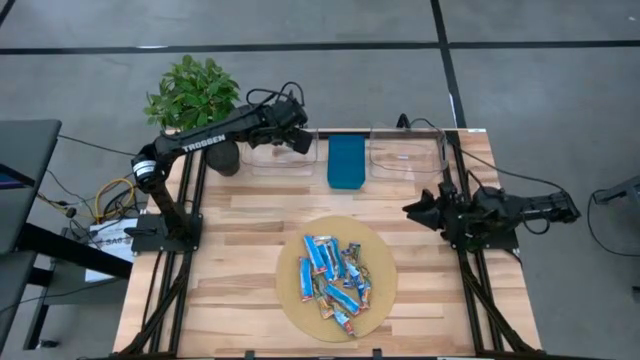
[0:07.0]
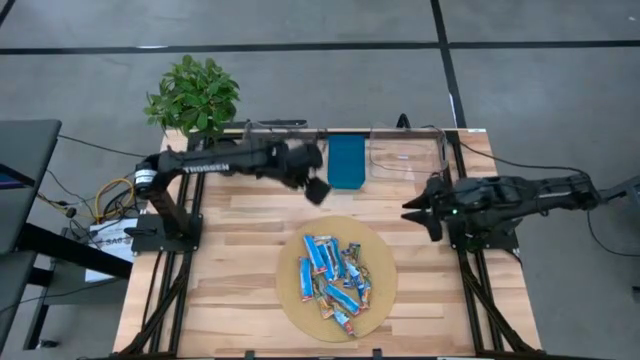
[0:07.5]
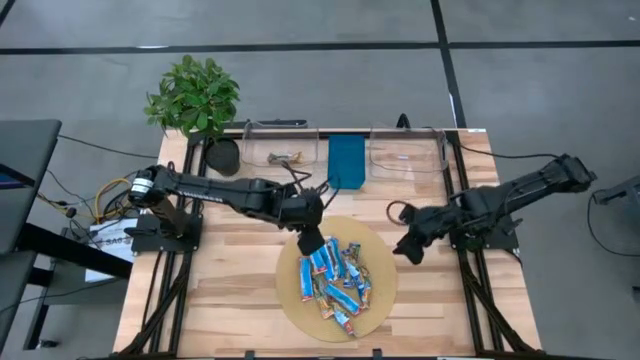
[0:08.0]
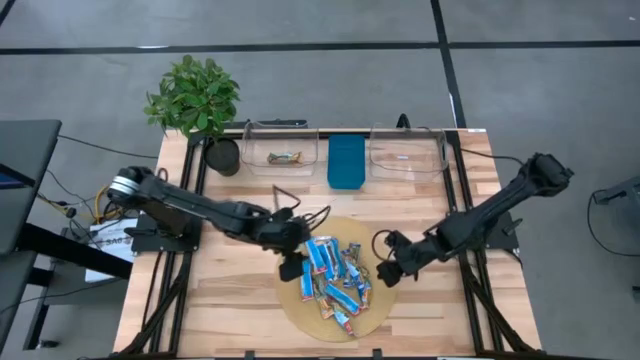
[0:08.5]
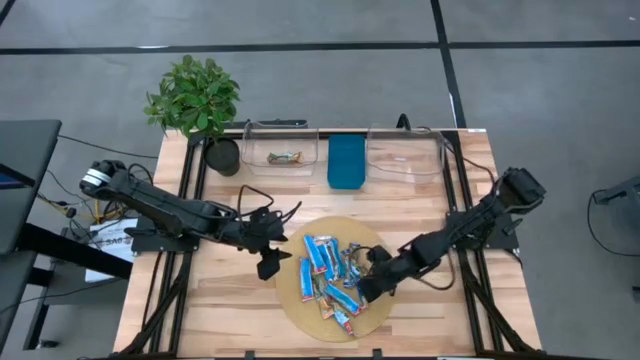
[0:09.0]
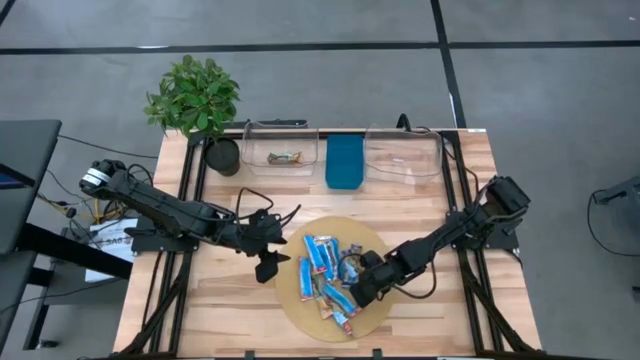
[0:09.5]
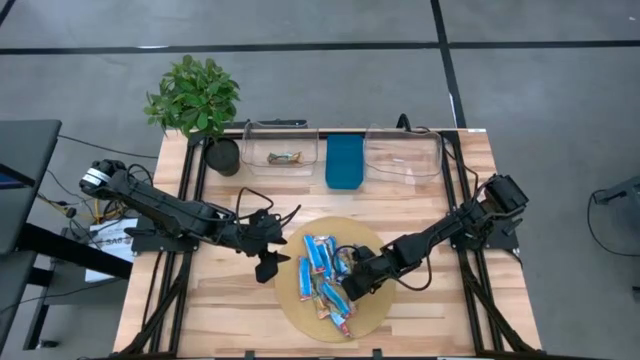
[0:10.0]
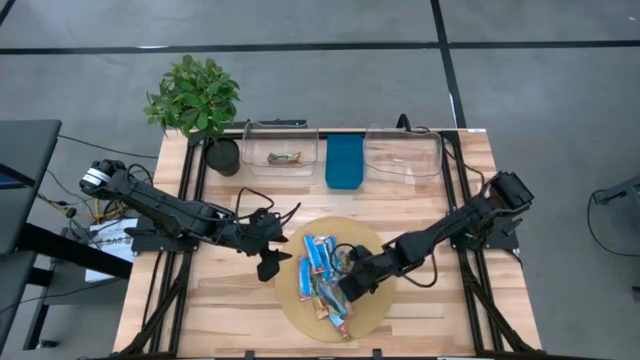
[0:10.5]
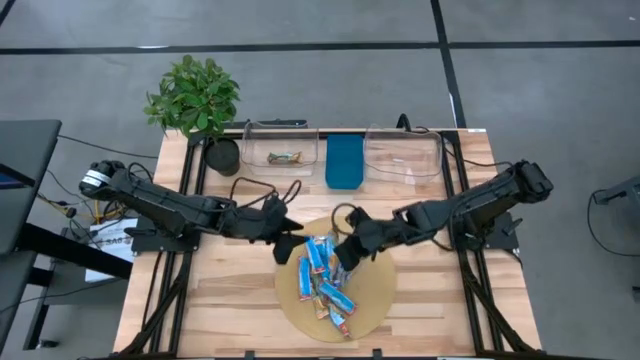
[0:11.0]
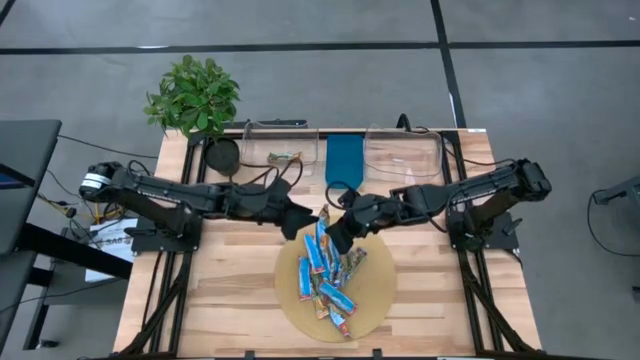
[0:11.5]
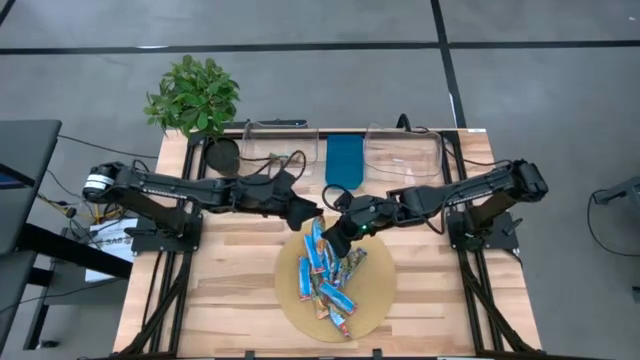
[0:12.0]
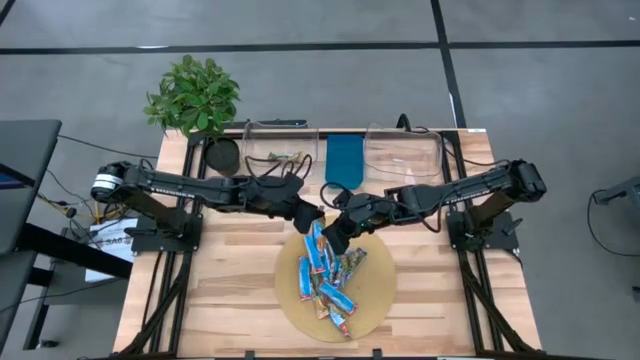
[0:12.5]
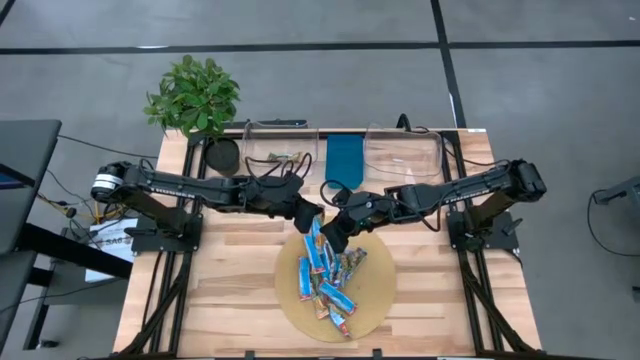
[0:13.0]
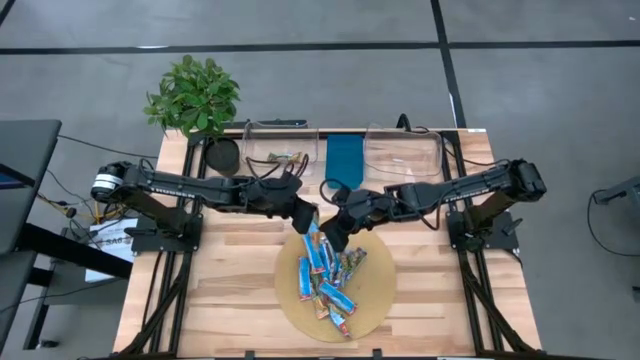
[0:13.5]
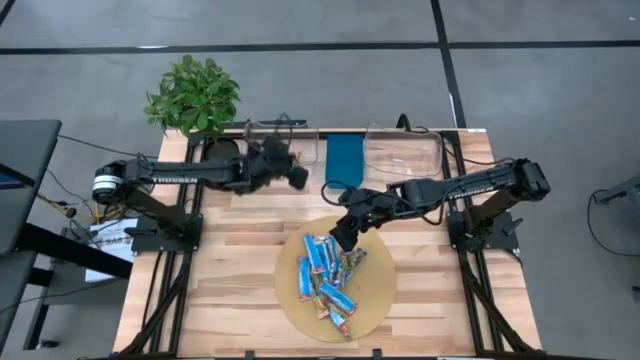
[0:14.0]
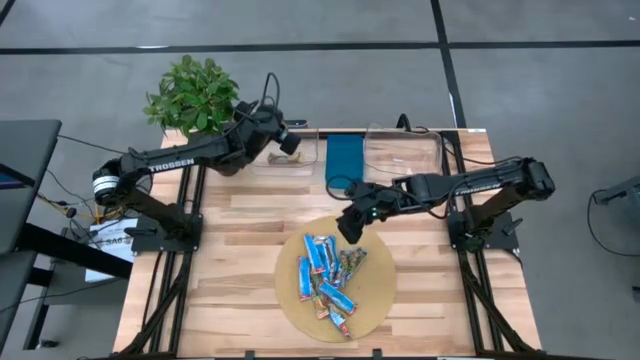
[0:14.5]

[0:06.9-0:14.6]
Task: Pick and place Granola Bars by type
Put the yellow granola bar into the left transparent bin

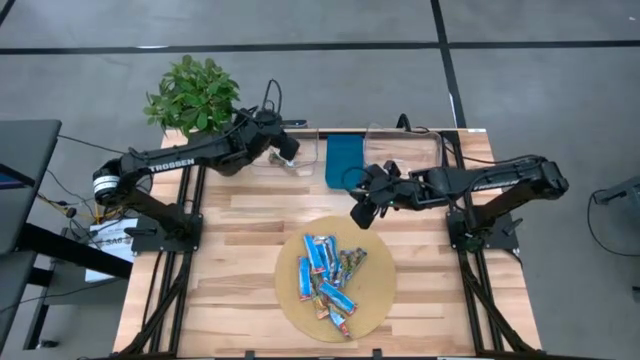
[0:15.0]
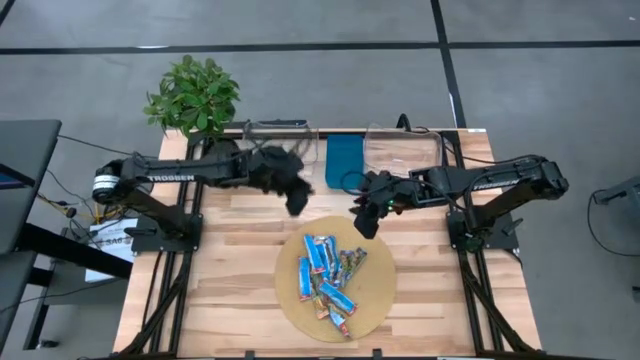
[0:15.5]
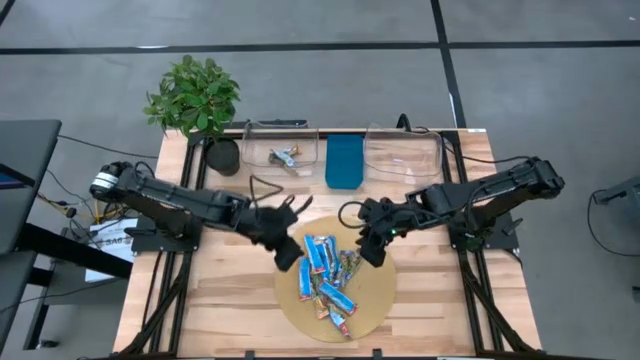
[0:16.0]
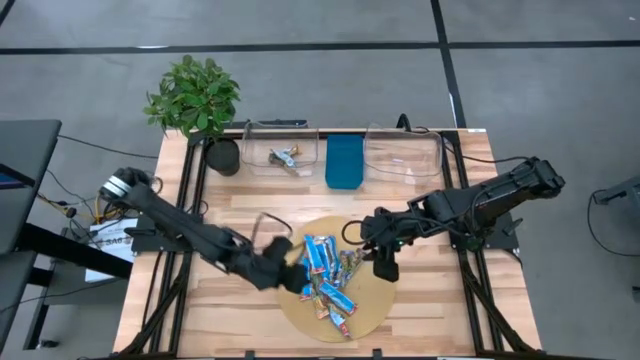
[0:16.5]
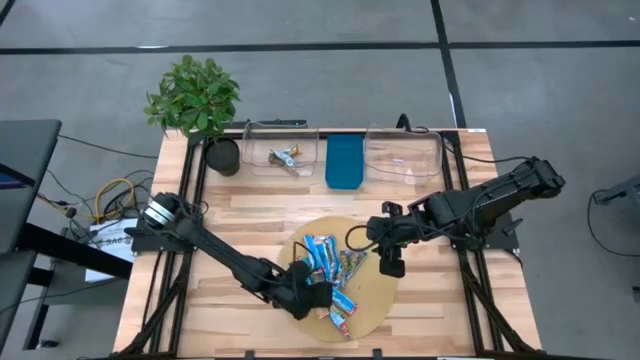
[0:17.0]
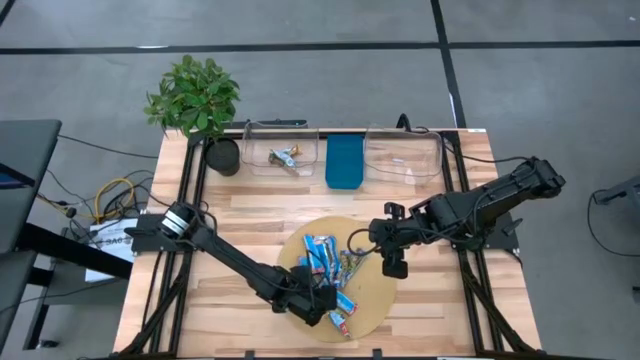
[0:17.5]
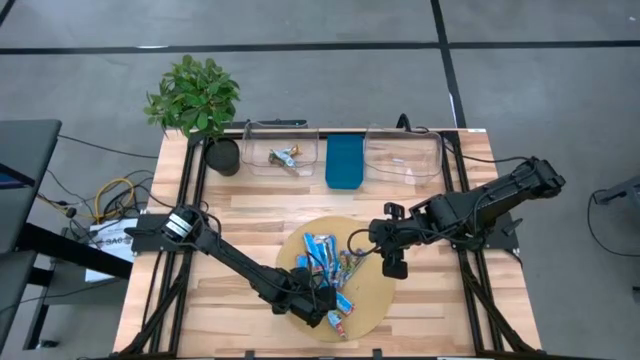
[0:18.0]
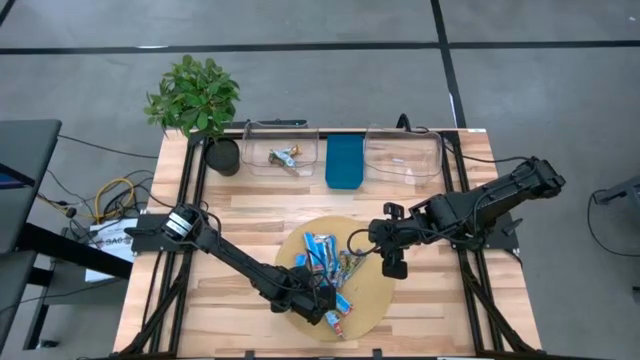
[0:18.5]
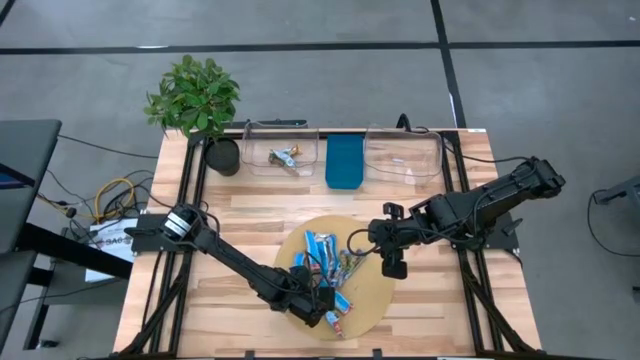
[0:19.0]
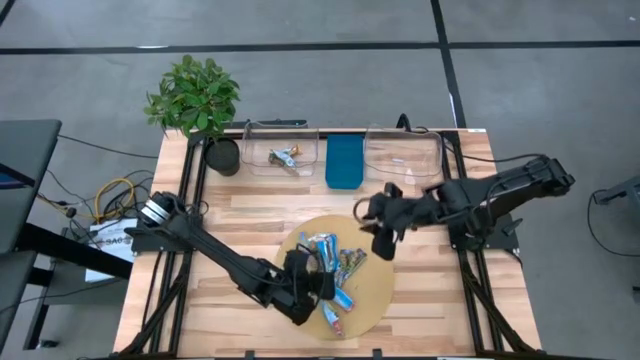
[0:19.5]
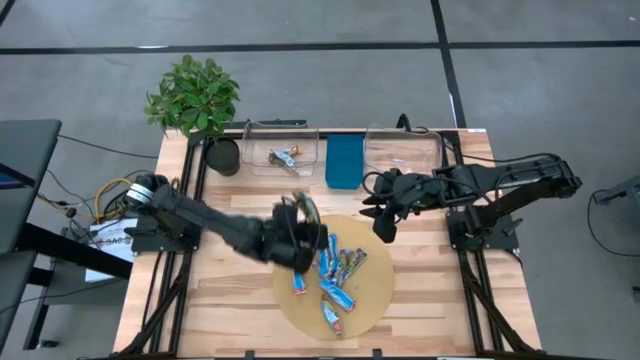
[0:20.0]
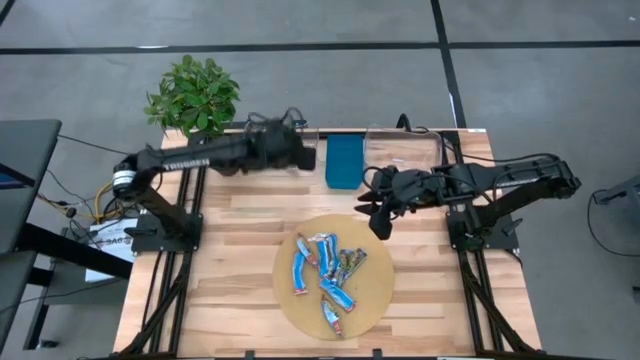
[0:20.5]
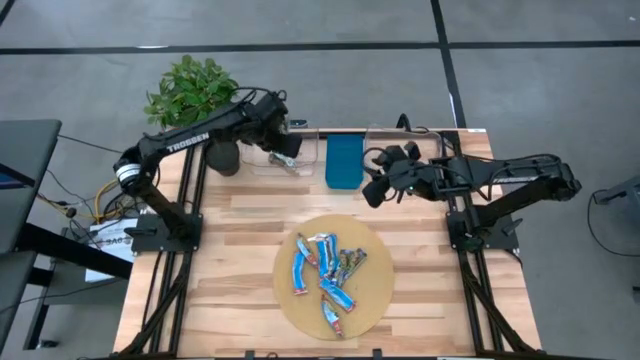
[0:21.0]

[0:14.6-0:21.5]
Put the yellow granola bar into the left transparent bin

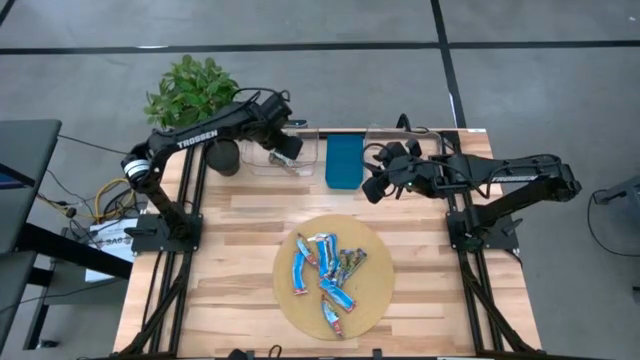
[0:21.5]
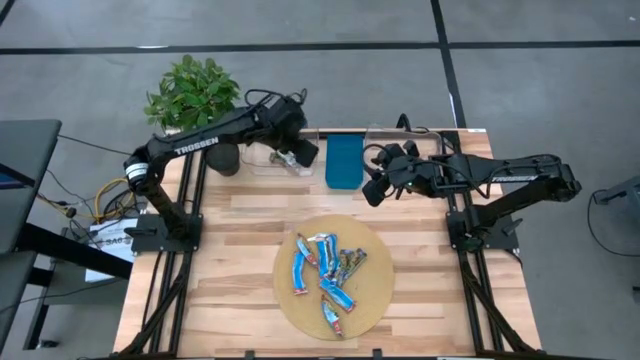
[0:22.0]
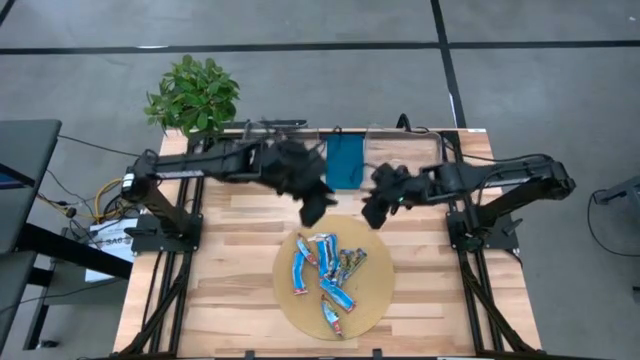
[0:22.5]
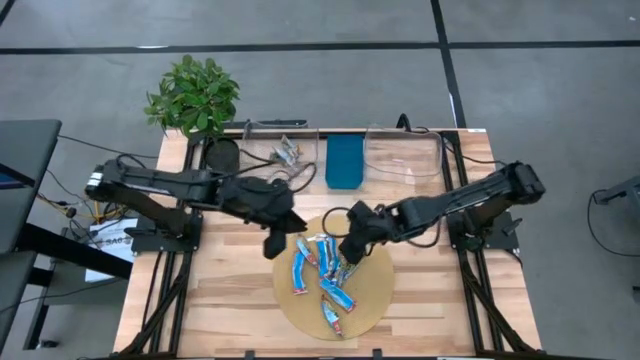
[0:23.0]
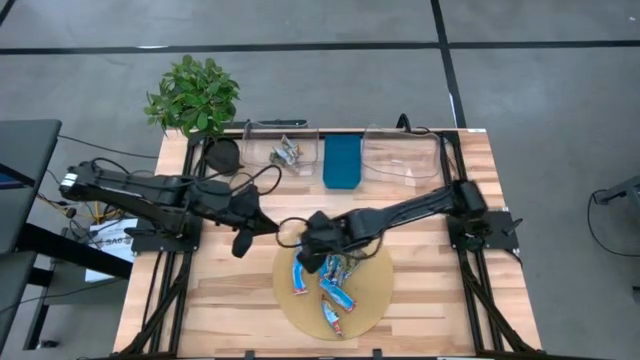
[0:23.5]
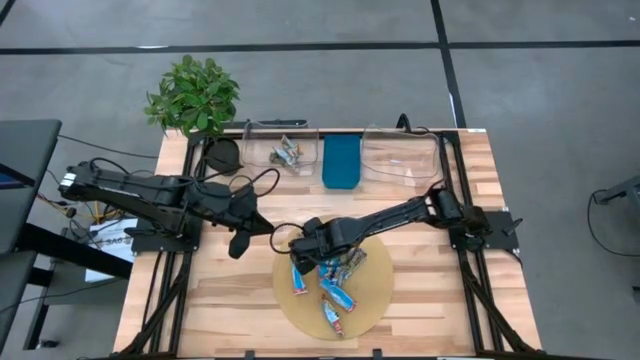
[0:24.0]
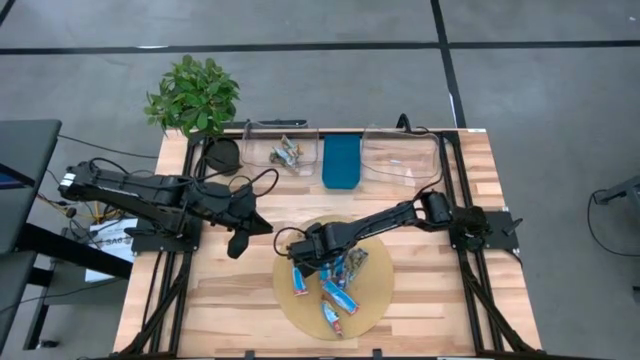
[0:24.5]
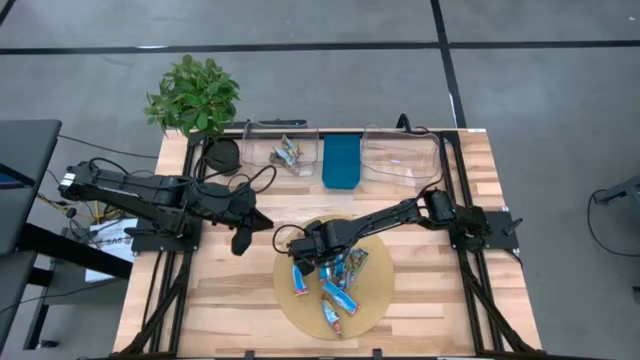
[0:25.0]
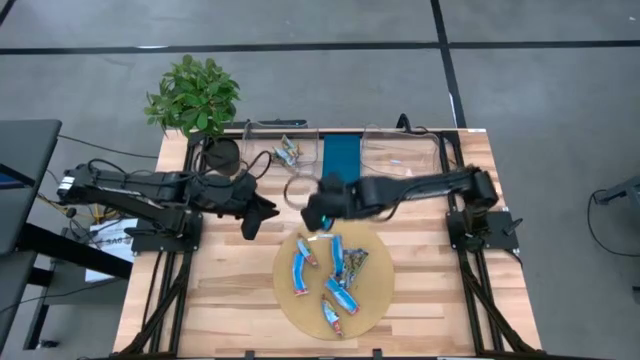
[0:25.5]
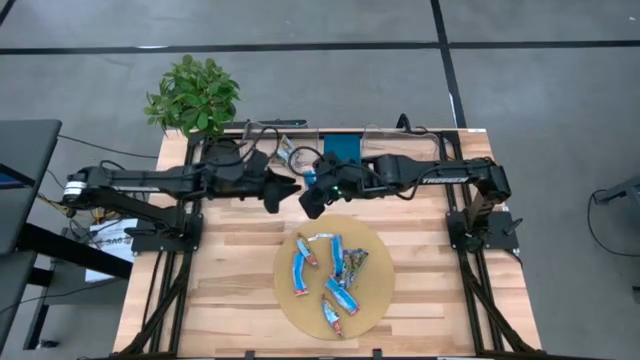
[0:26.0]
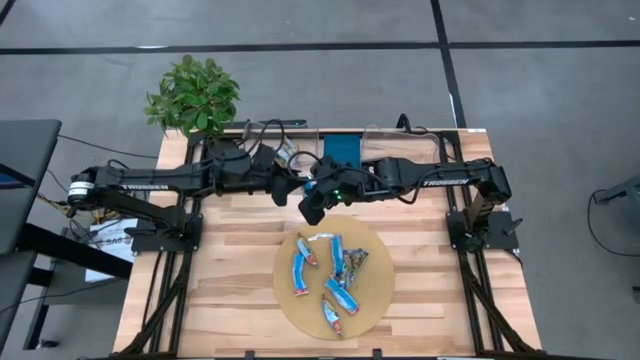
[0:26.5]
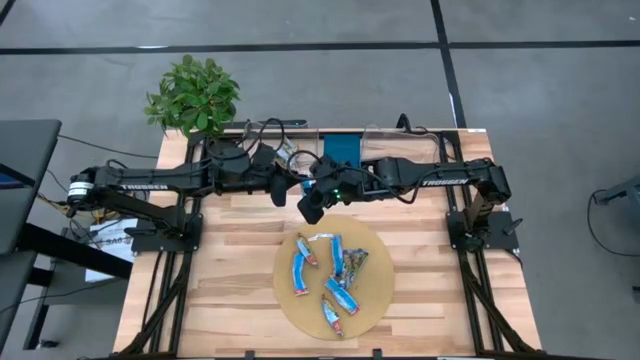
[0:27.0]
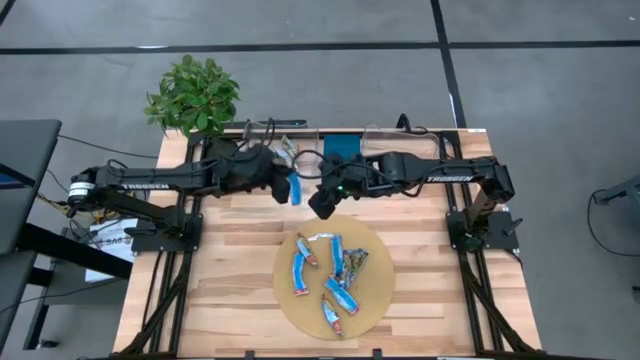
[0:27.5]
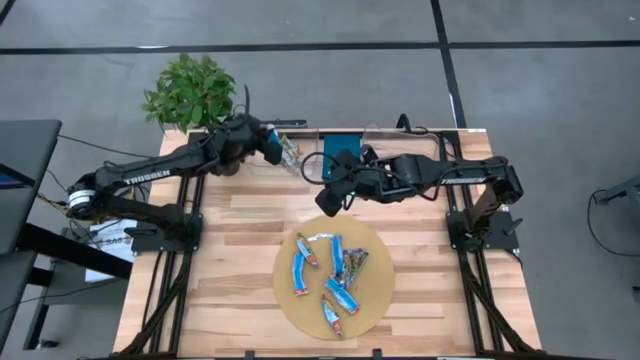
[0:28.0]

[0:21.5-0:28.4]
Put the yellow granola bar into the left transparent bin

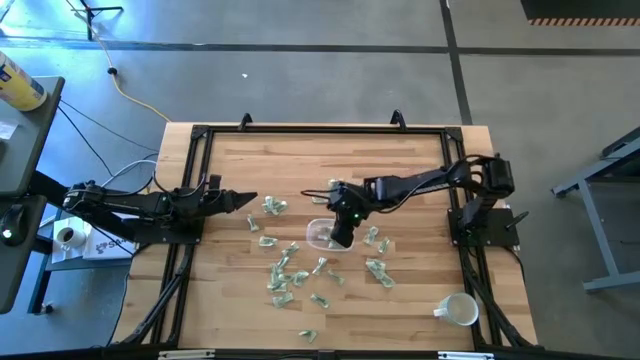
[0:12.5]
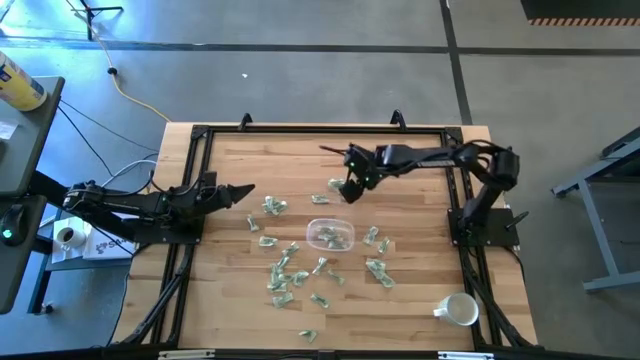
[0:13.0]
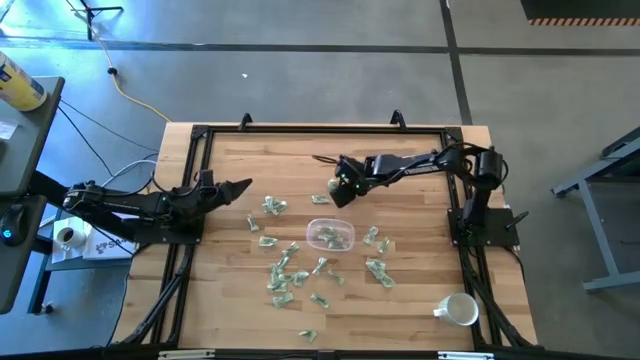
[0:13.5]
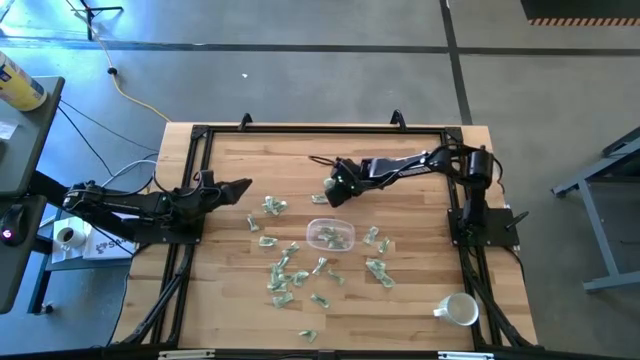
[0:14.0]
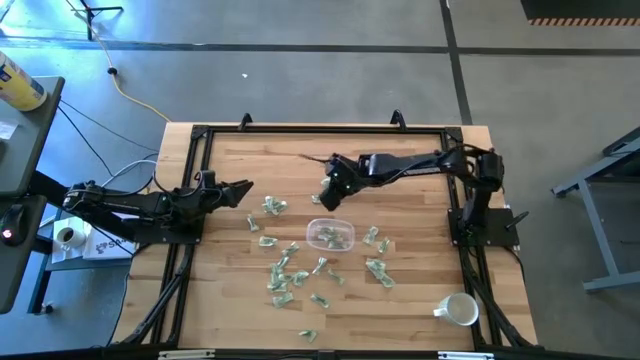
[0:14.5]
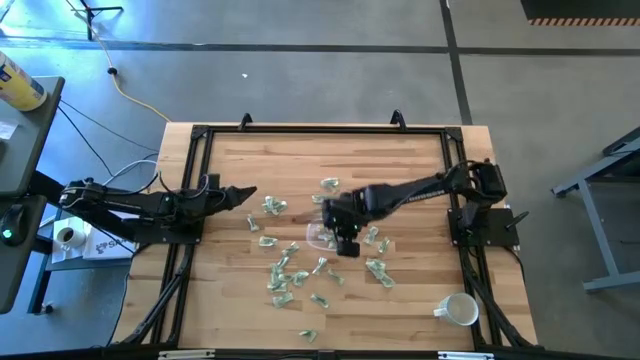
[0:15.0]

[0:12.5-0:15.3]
Task: Pick and place Stevia / Truvia into bins
Put the green stevia packet into the transparent container
